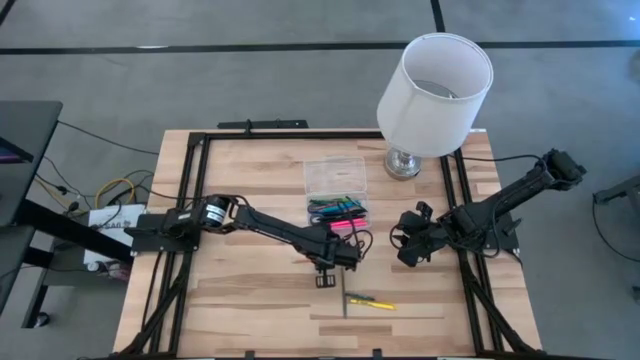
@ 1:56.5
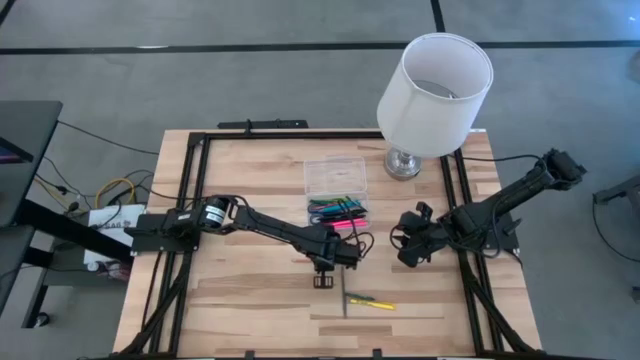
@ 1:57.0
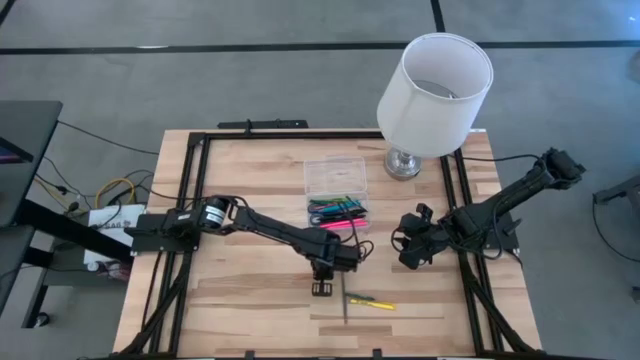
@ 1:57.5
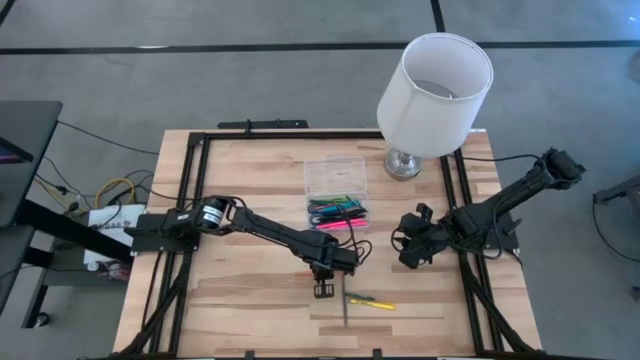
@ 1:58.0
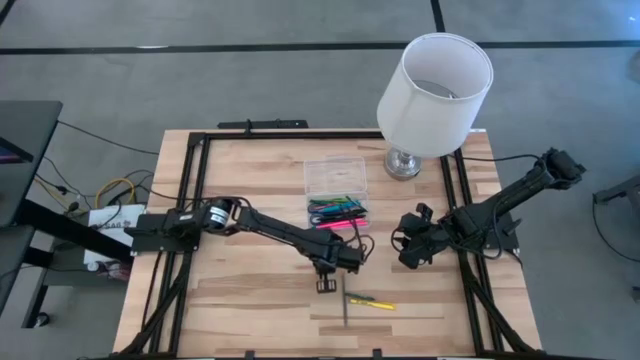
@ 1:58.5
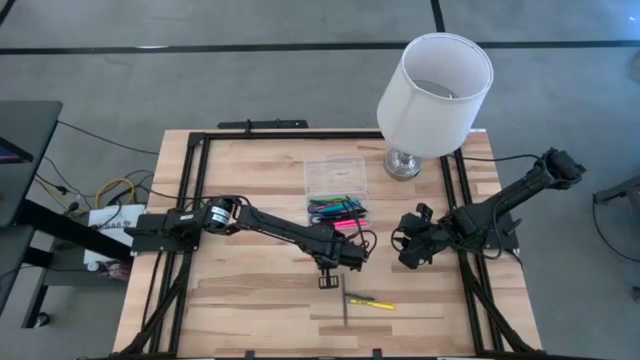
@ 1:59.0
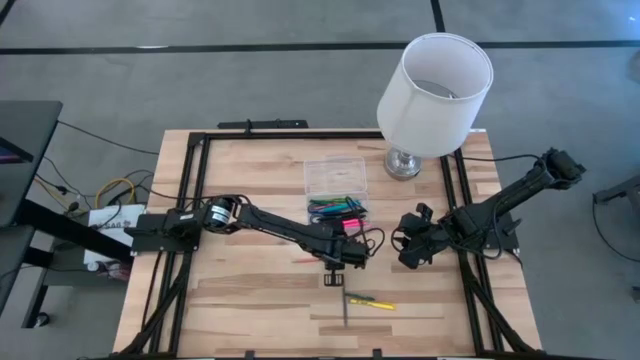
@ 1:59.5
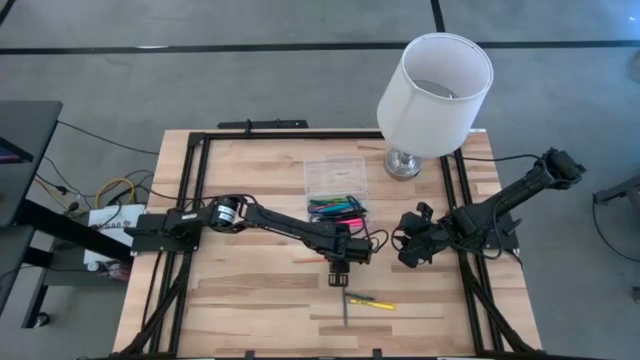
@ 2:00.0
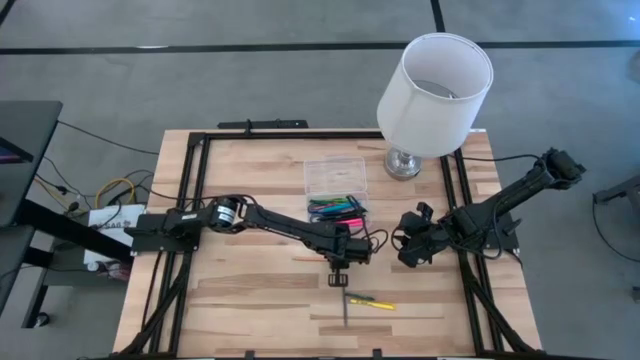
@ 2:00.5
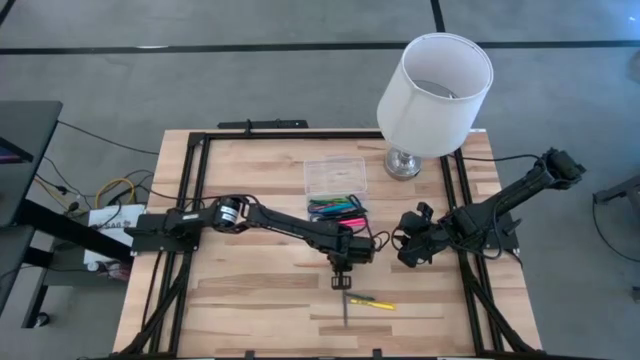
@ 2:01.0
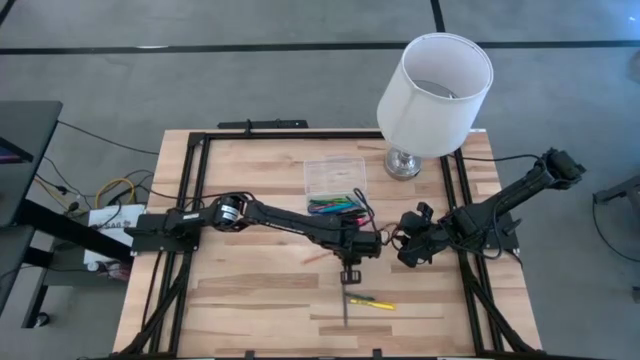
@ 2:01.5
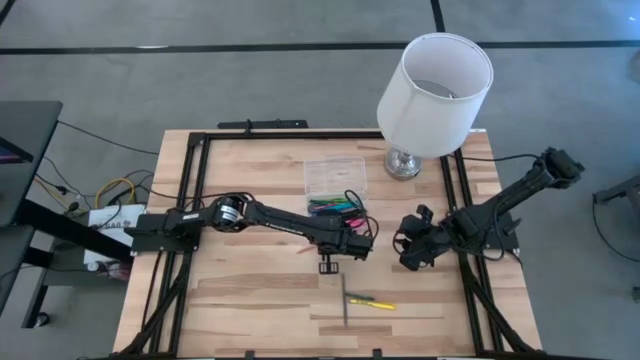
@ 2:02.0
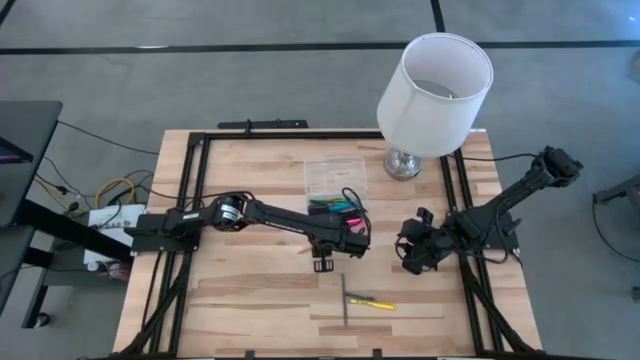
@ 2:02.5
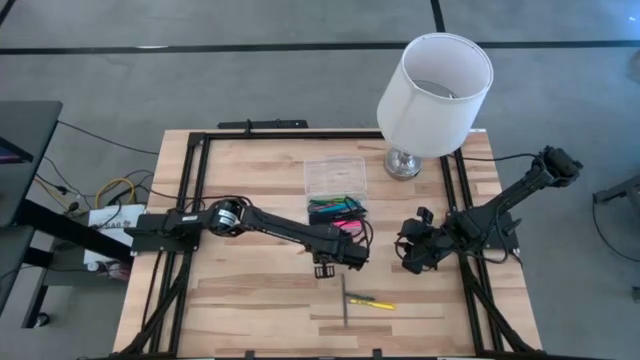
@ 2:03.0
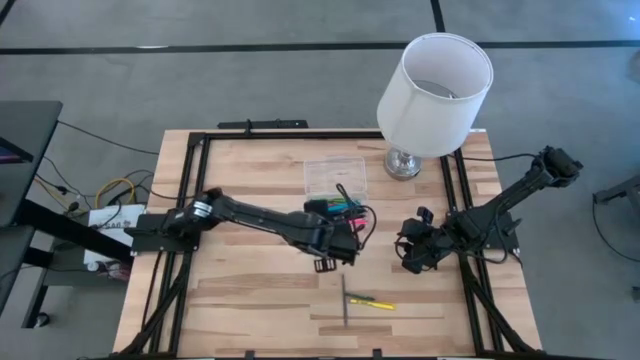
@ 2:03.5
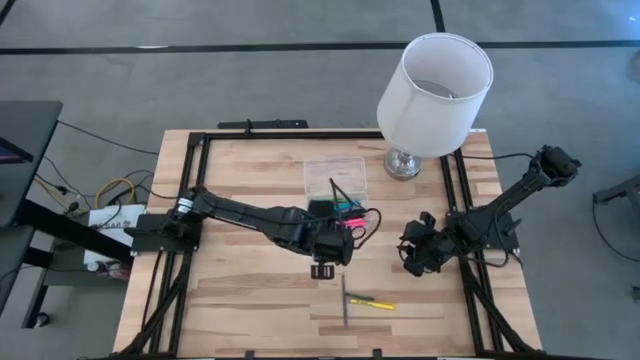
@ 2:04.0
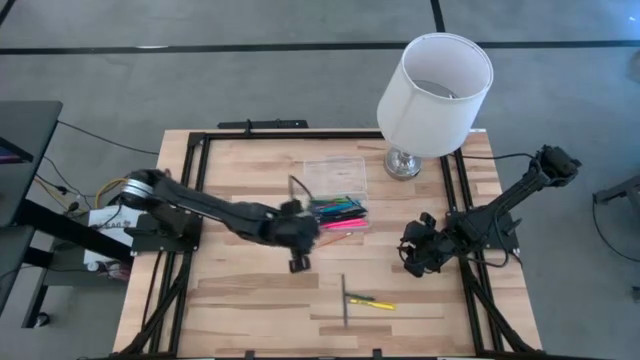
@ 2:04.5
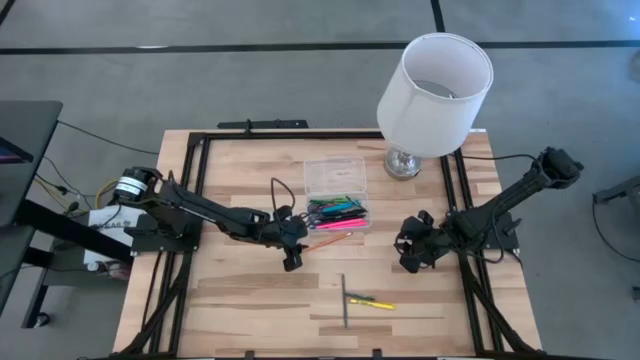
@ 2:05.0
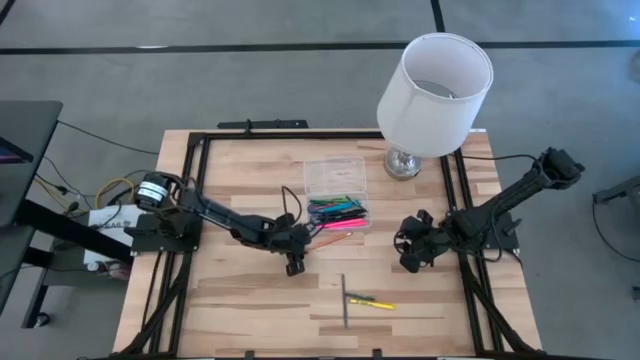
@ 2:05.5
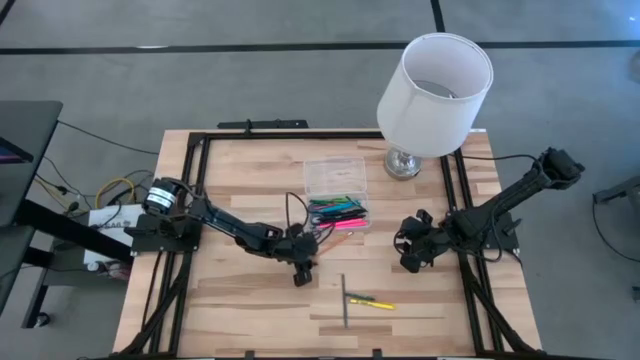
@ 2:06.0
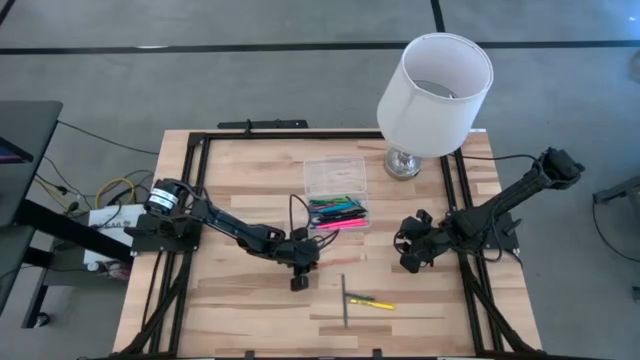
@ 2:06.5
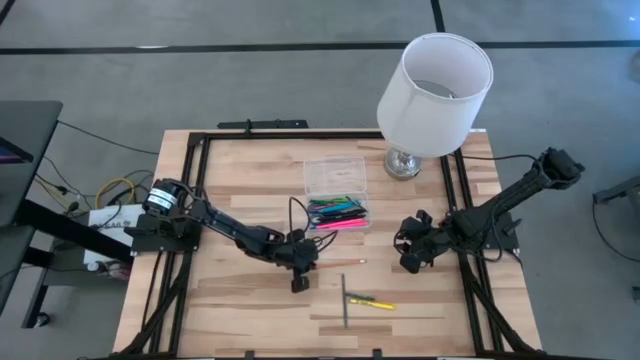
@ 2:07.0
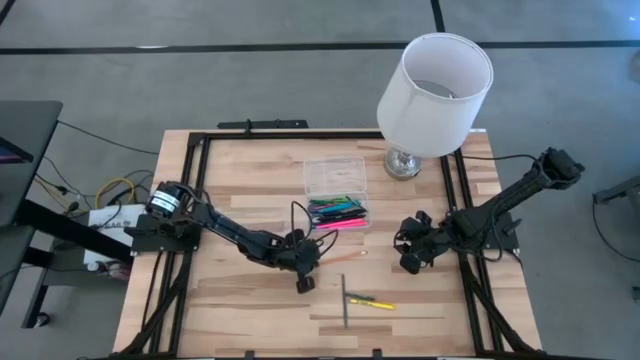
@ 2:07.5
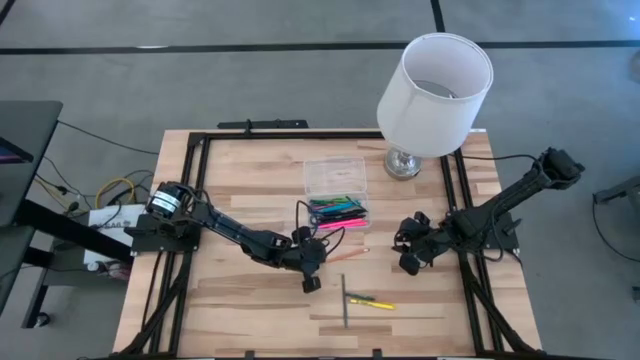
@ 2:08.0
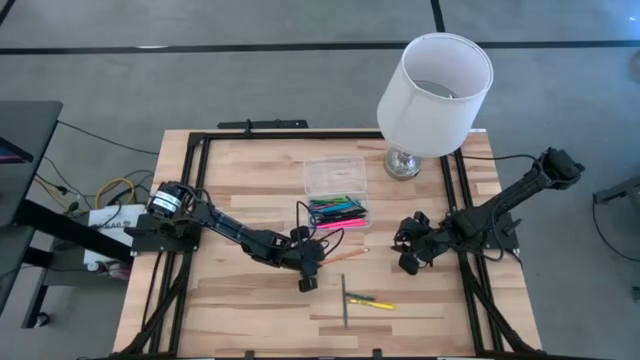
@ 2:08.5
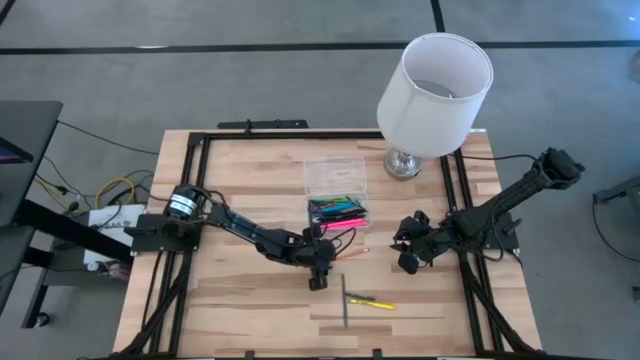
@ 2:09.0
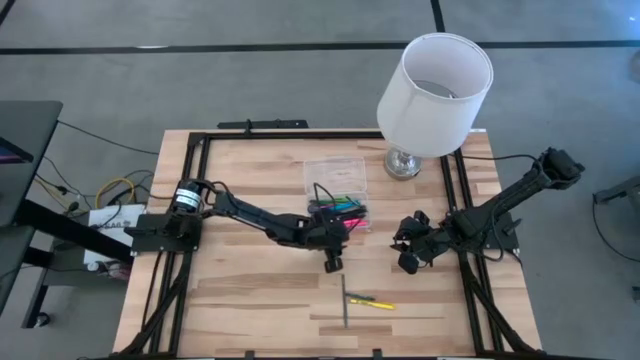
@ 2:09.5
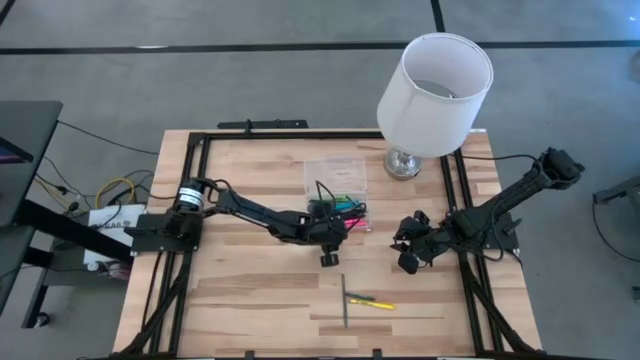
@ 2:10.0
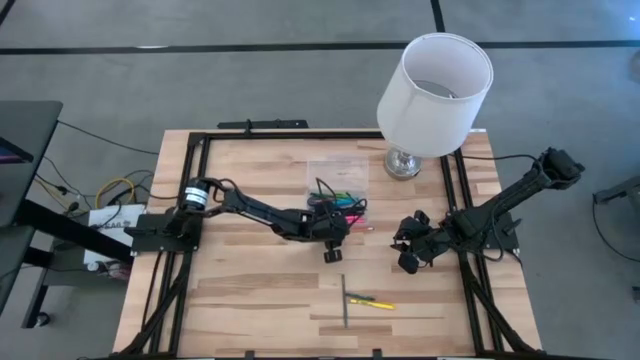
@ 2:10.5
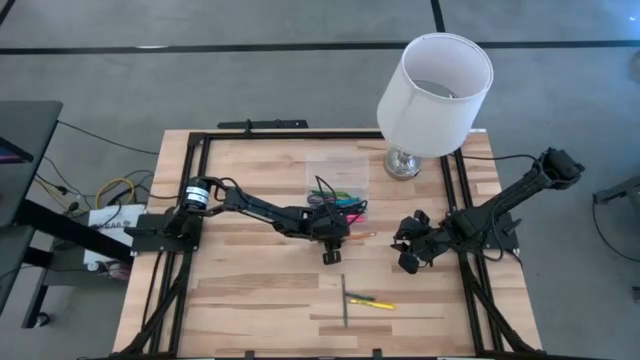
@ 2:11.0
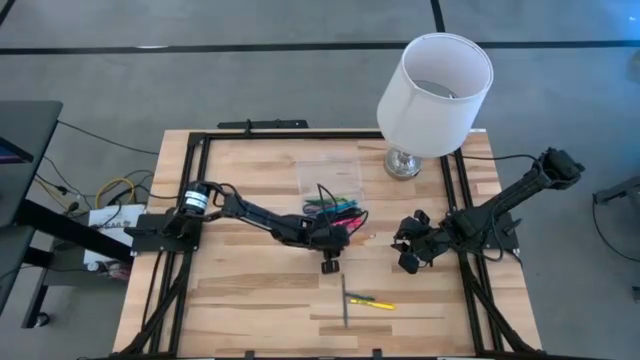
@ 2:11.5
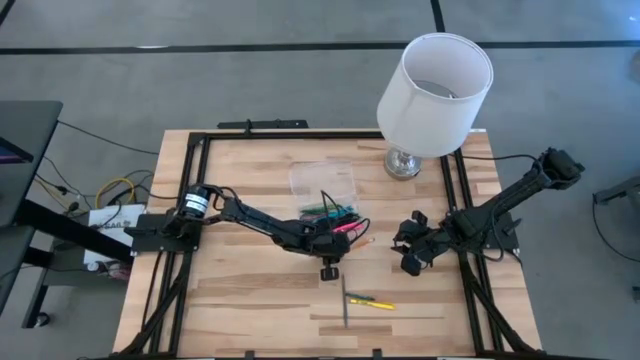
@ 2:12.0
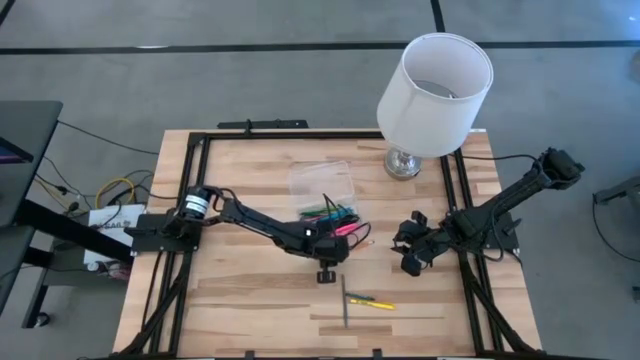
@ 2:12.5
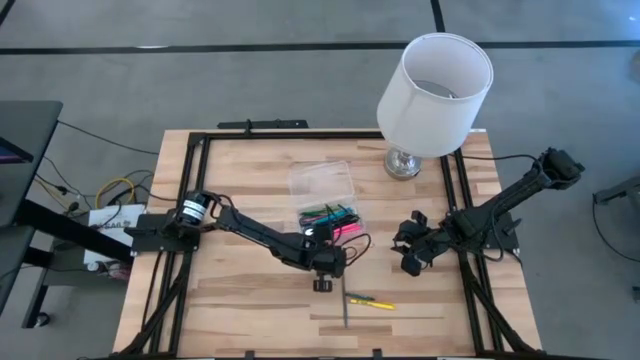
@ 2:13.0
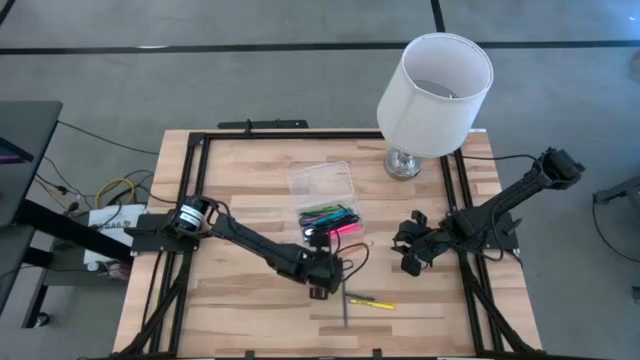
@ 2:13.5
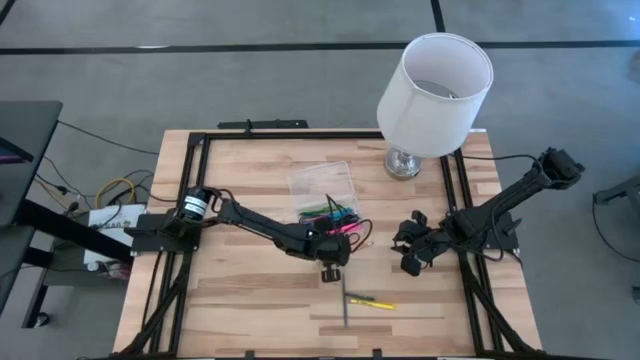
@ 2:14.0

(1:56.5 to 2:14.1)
Task: Pick & place school supplies into a supply box
Put the yellow pencil into the transparent supply box

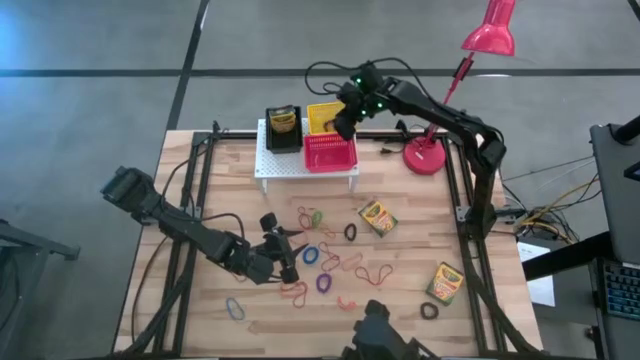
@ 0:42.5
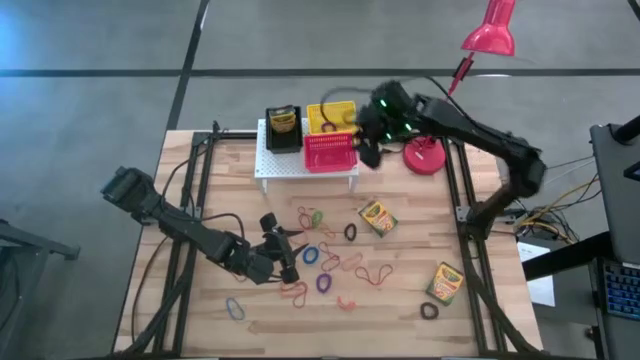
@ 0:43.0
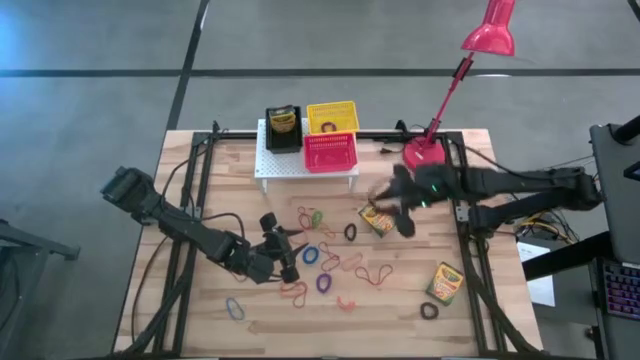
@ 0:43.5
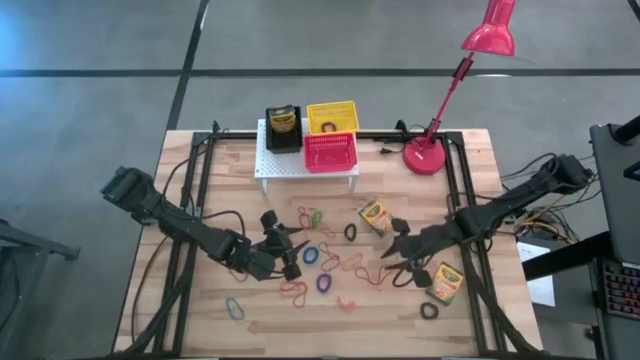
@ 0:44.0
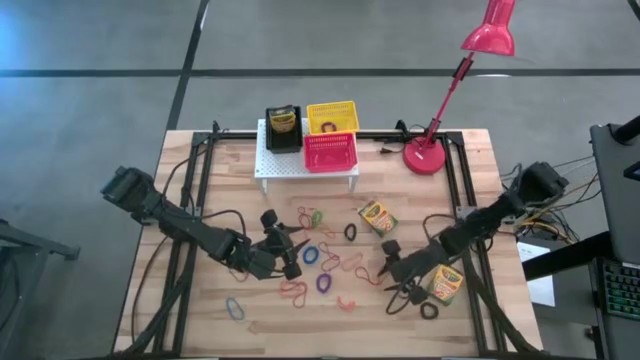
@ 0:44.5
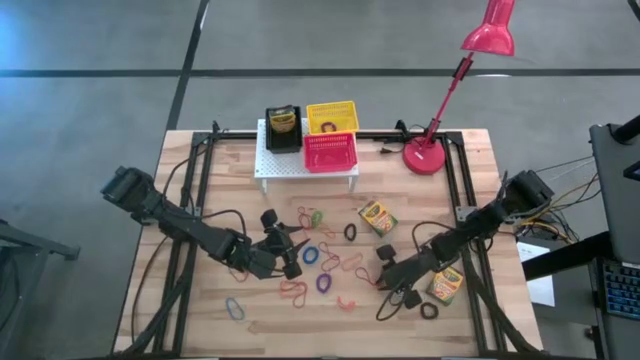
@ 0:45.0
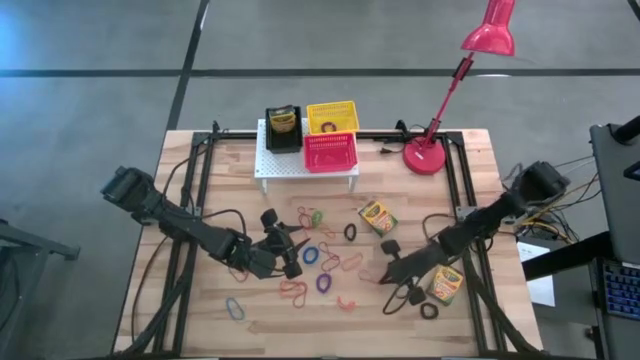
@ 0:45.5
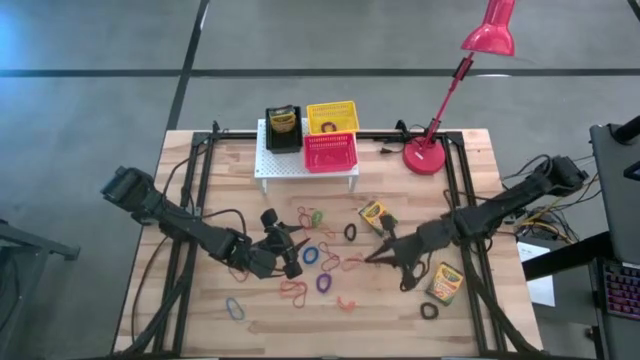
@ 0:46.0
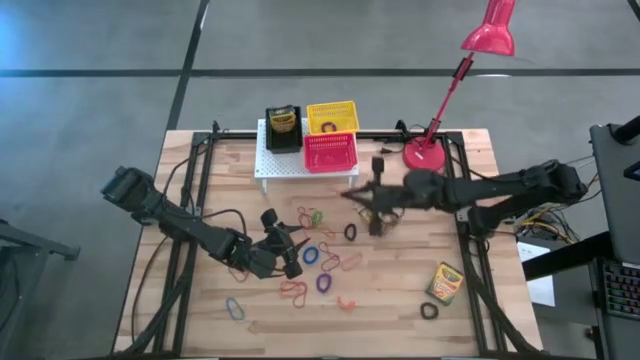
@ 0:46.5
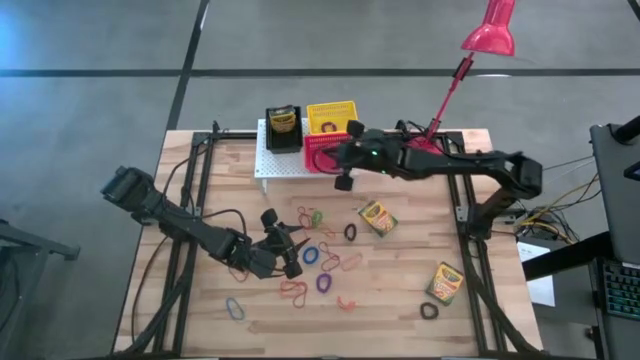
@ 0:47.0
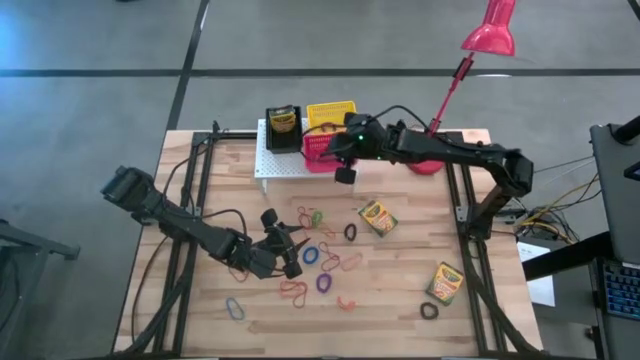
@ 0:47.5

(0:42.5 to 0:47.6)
Task: Pick & Place Office Desk Supplies
Put the red rubber band into the red bin on the shelf
